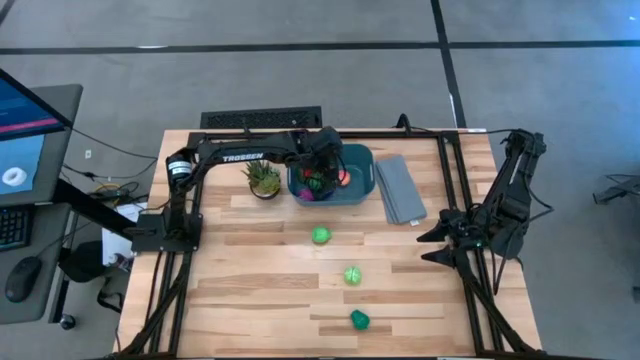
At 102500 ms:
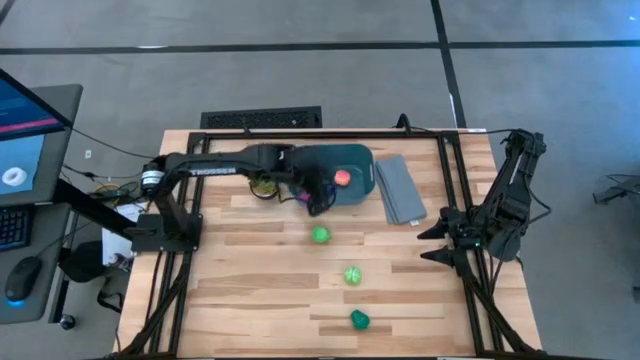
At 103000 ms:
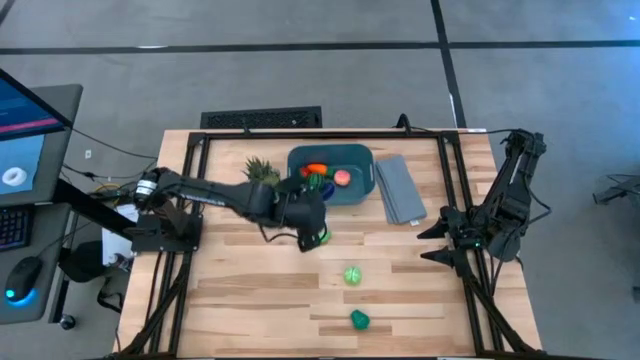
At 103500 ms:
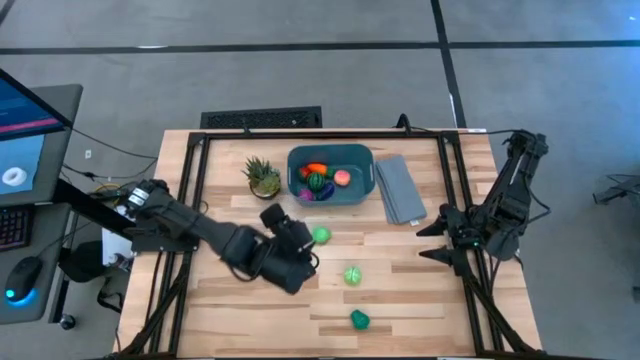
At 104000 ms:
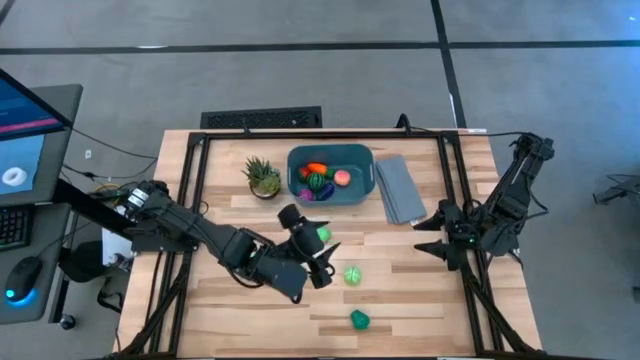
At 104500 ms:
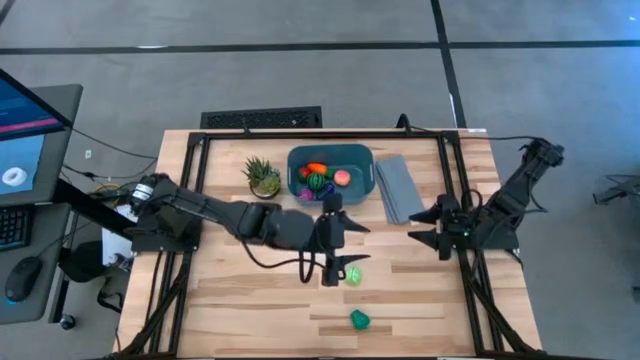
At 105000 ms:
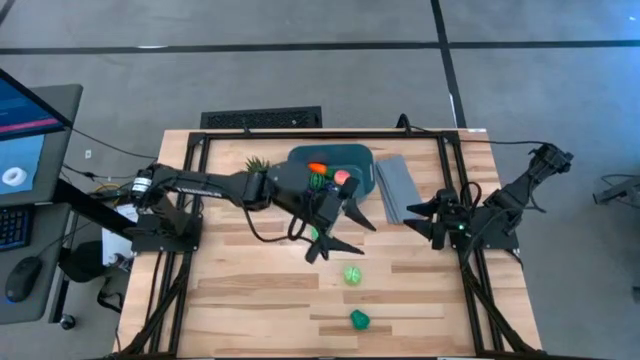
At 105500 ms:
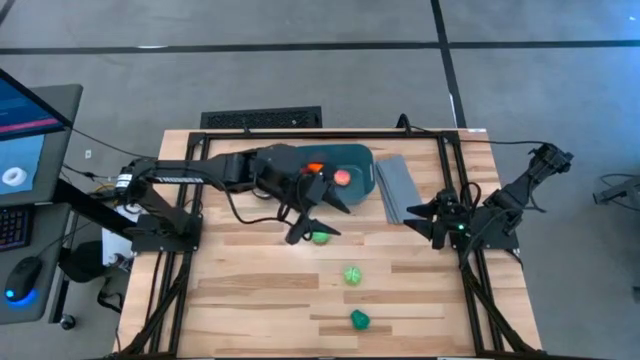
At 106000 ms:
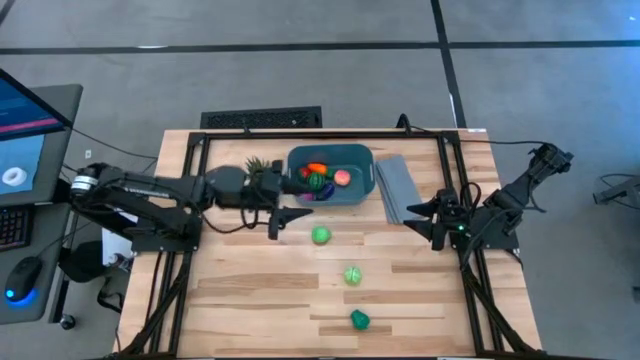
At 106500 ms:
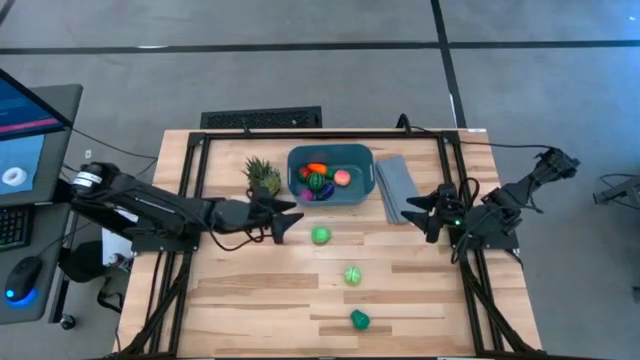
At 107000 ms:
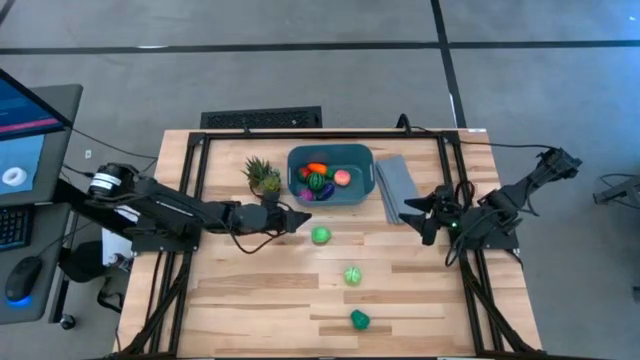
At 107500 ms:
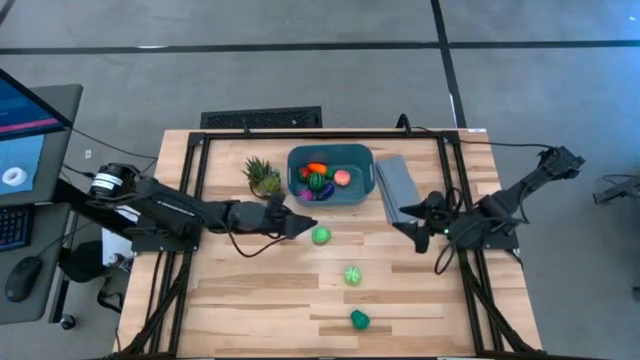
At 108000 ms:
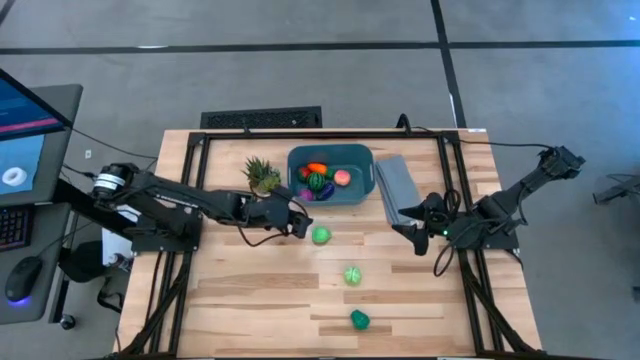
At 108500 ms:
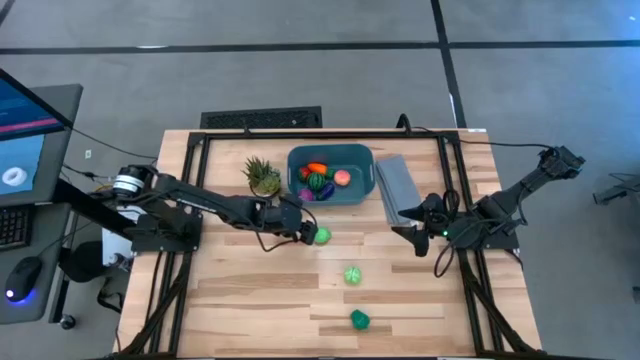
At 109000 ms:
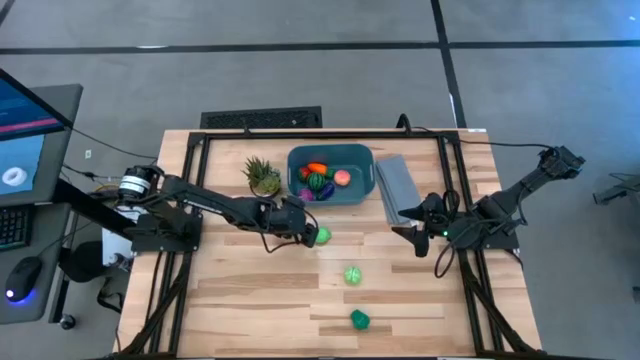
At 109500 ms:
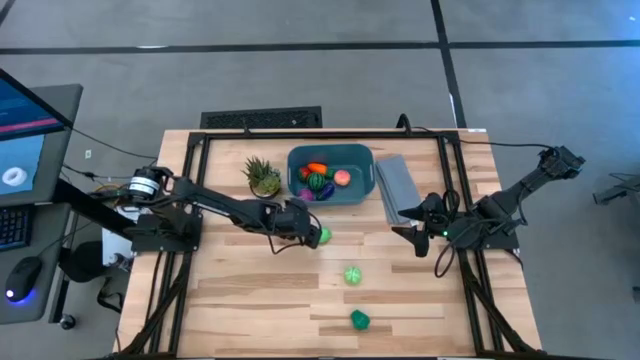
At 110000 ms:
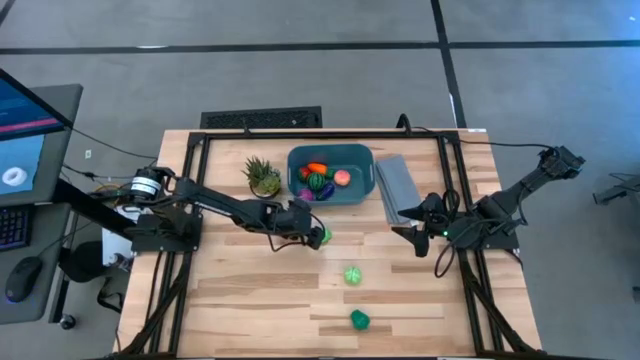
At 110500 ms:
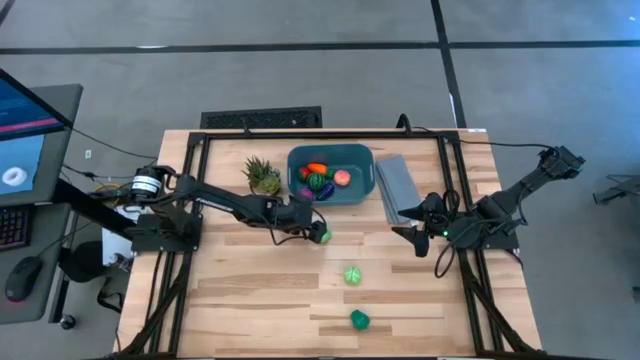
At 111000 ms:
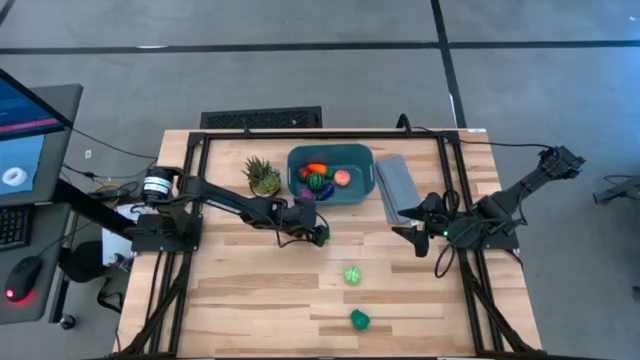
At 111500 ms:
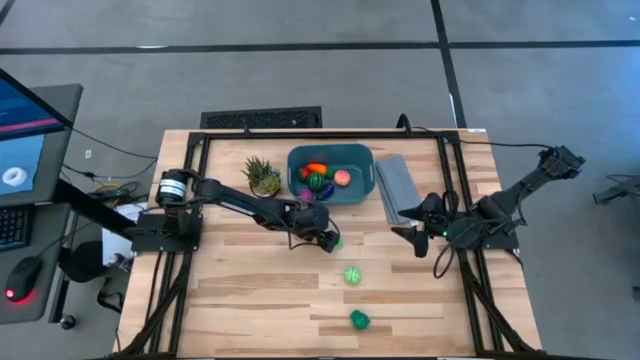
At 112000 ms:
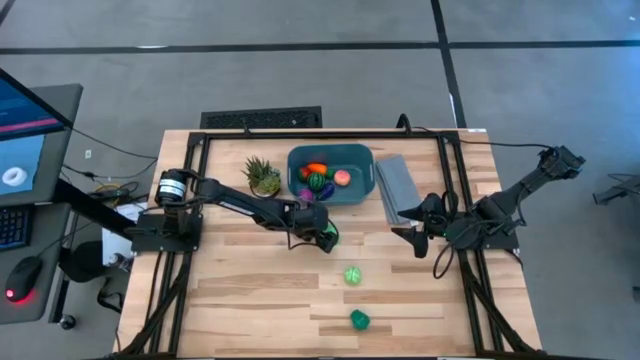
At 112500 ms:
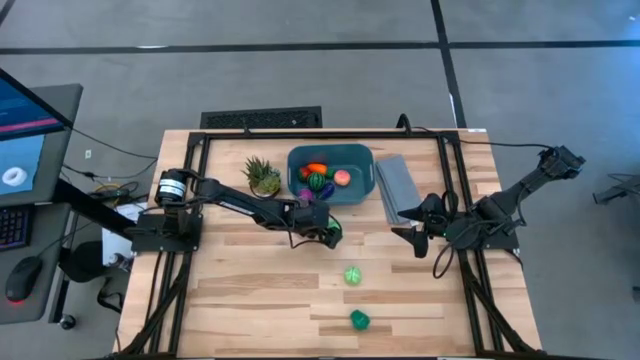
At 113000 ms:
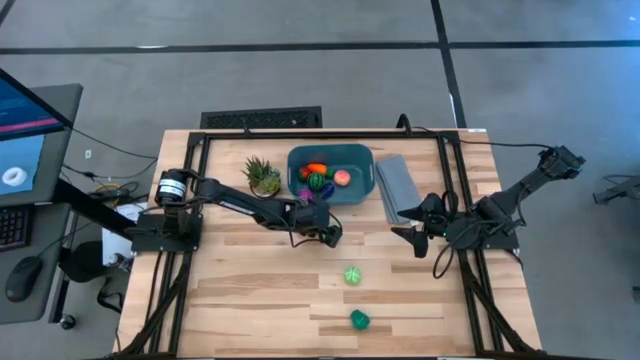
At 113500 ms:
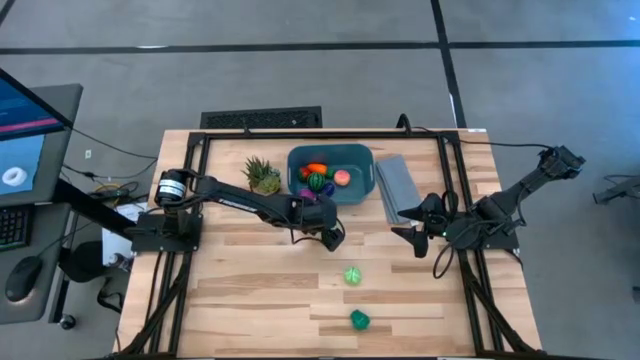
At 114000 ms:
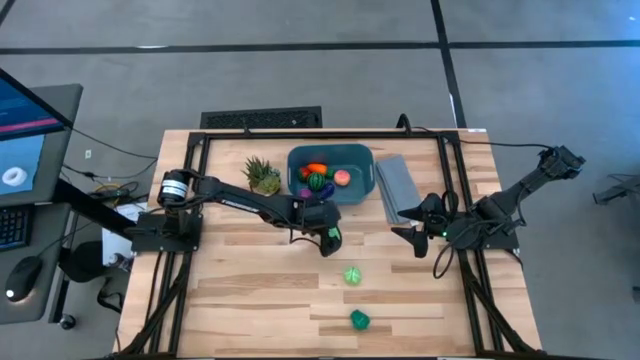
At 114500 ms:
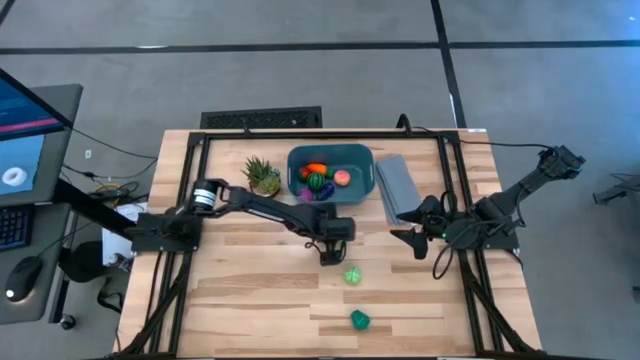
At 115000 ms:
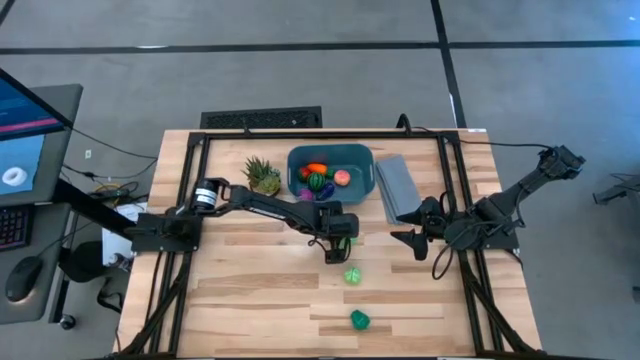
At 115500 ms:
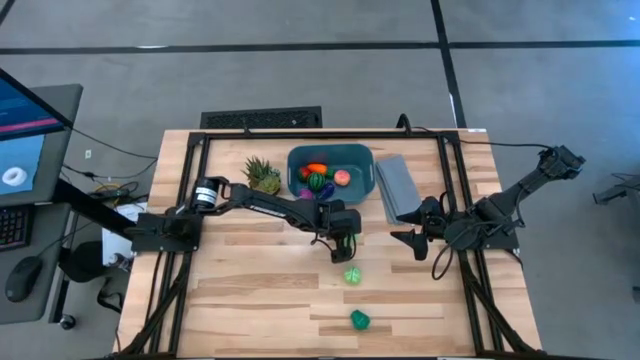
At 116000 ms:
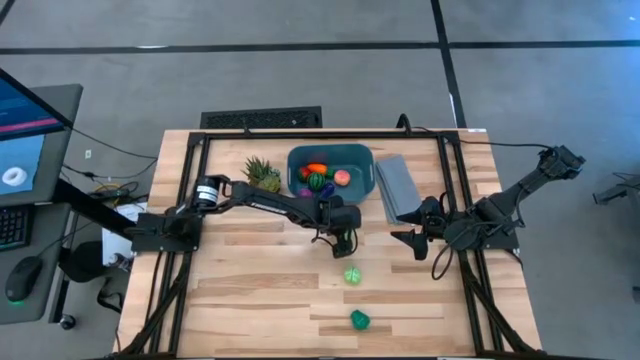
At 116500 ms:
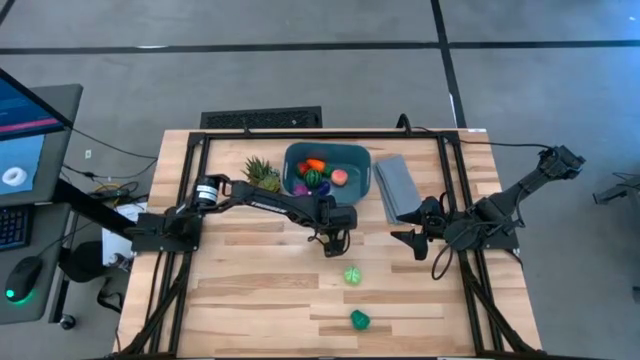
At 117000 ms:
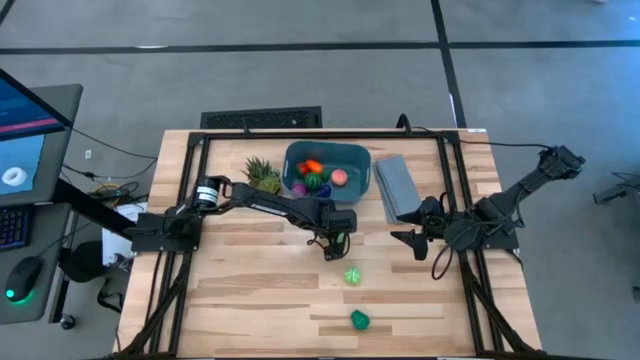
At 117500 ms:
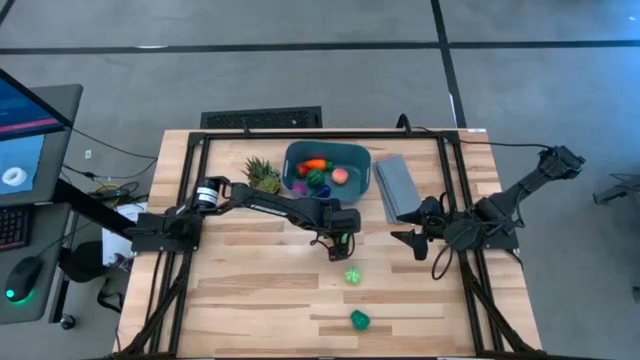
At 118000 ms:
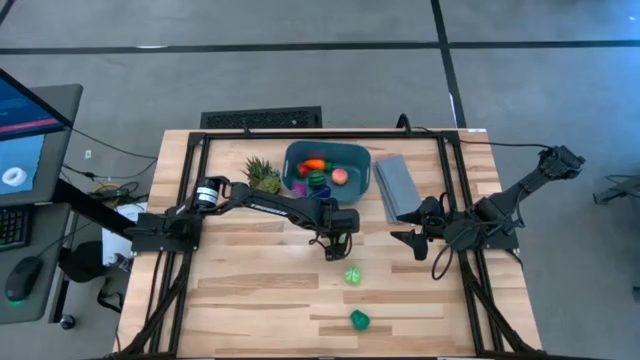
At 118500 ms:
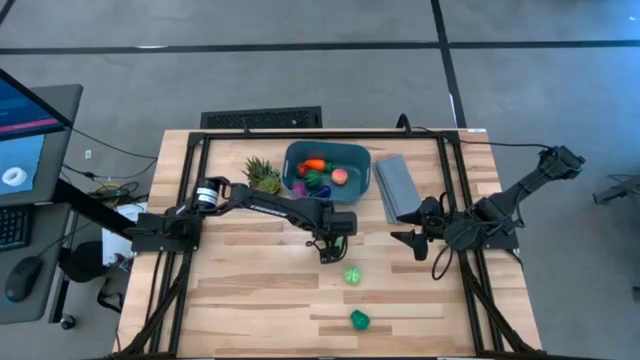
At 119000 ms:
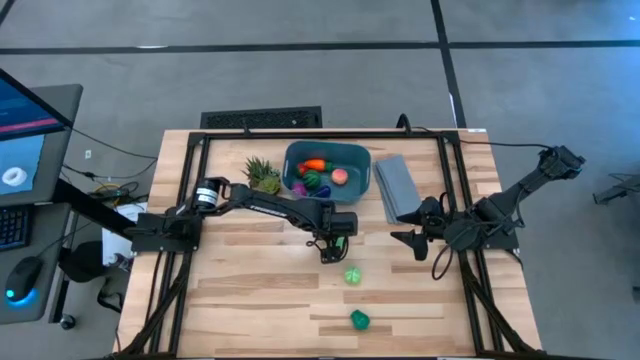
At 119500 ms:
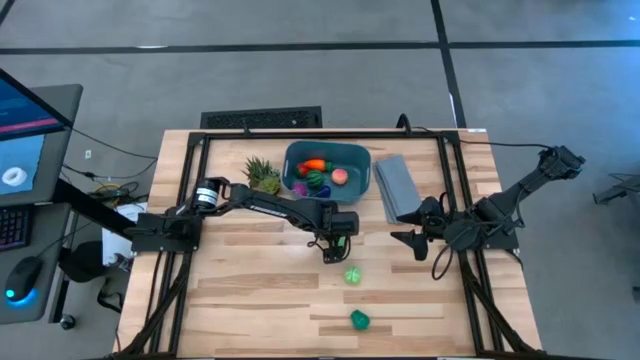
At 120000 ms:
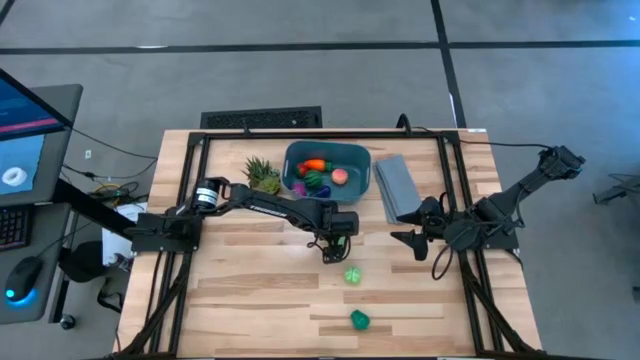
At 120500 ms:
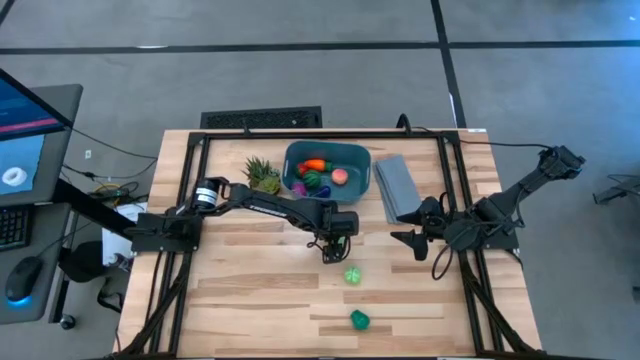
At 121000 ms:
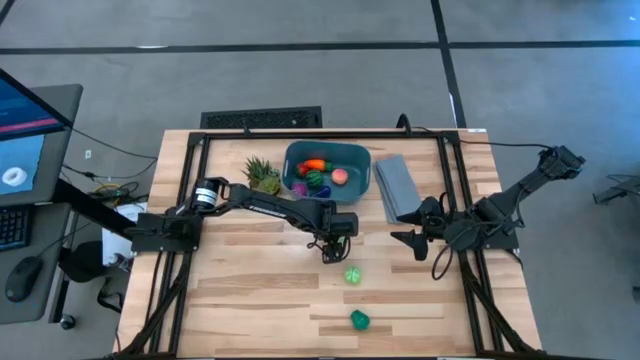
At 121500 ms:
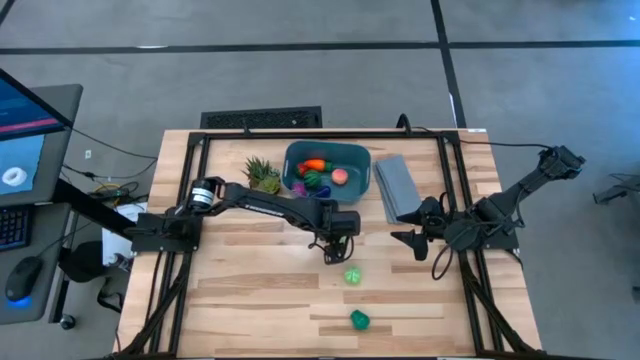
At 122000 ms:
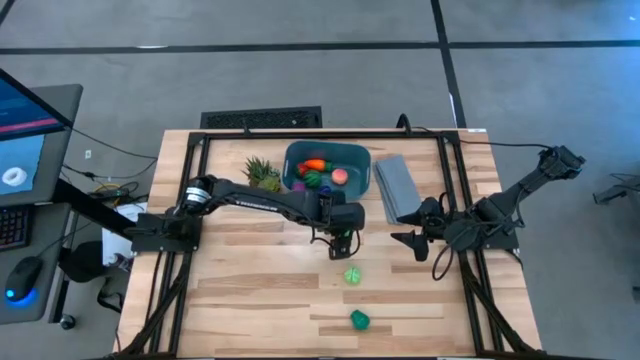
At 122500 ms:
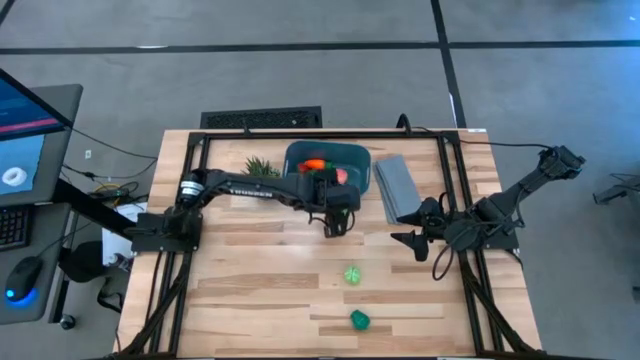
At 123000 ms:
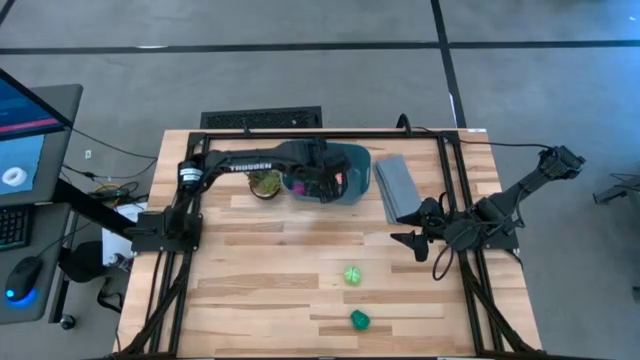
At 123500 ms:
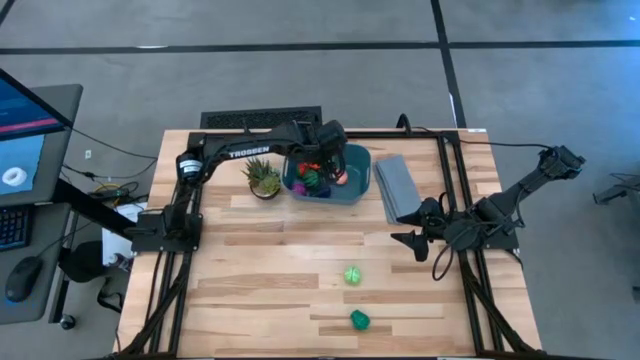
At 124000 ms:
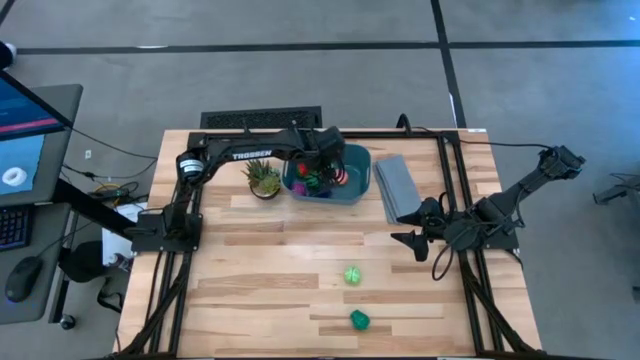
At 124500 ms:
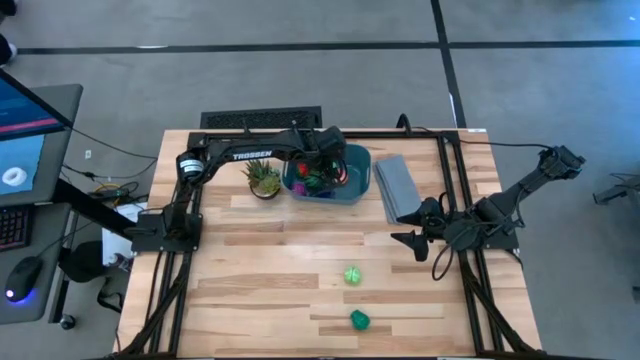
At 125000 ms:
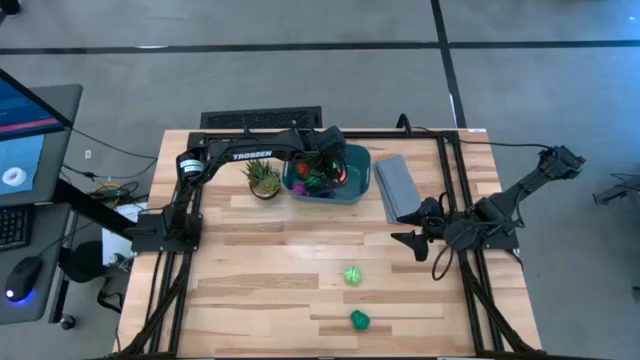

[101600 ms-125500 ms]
Task: Pick and placing Produce into tupperware
Put the pear into the blue bin
